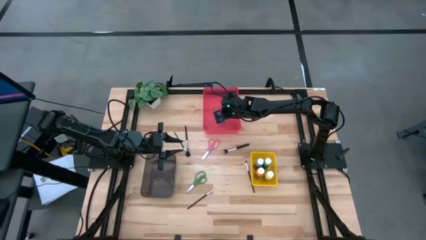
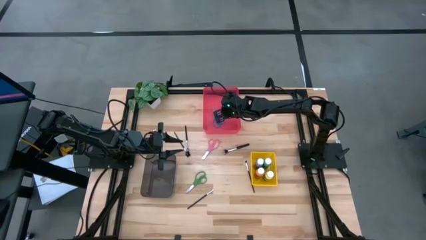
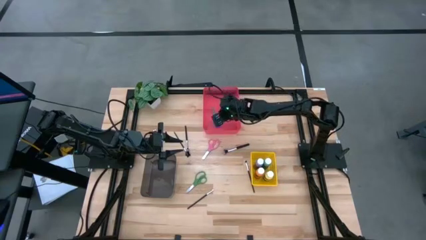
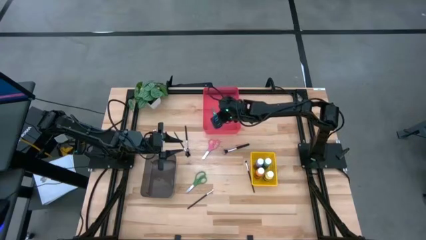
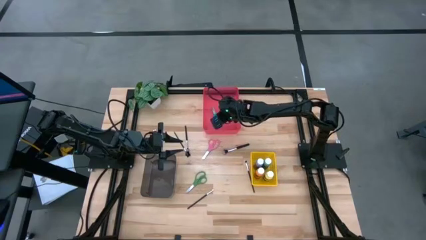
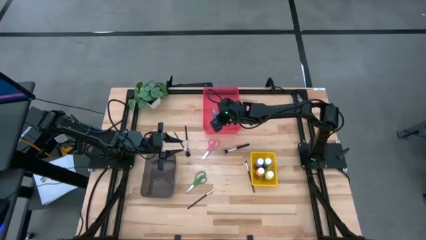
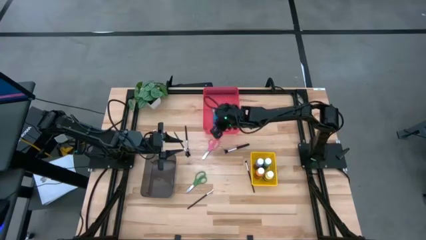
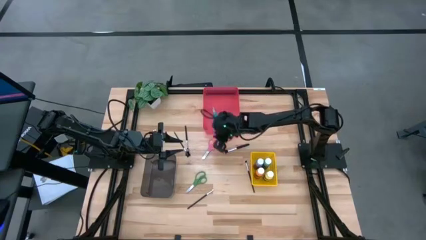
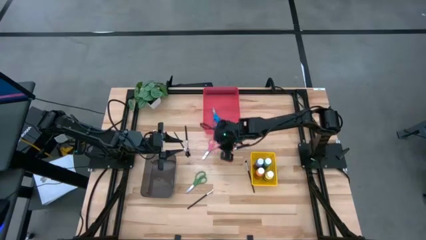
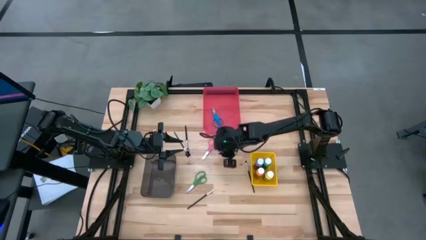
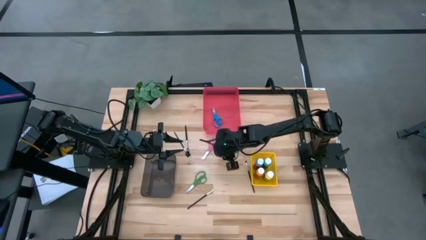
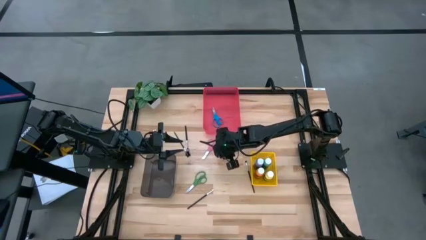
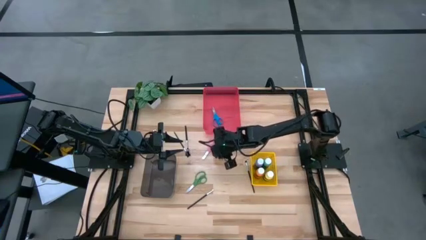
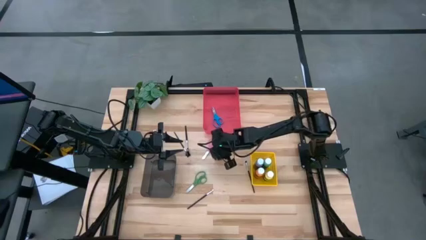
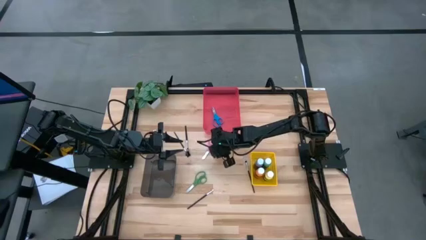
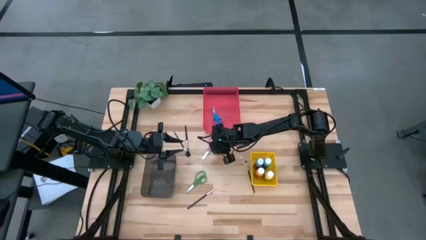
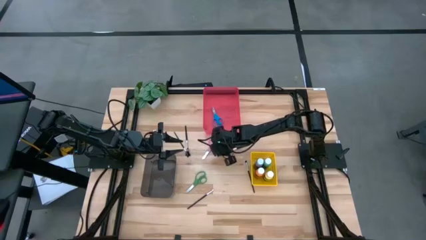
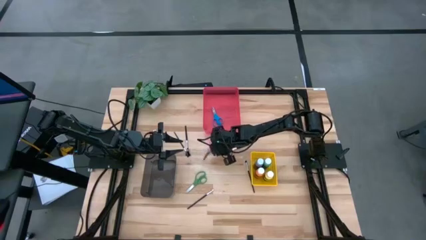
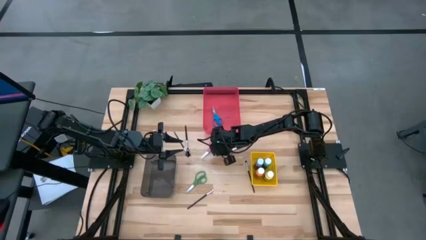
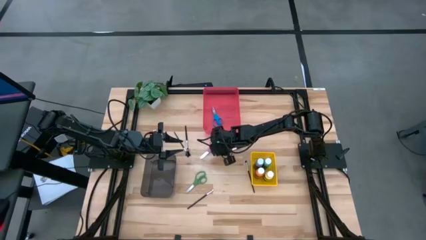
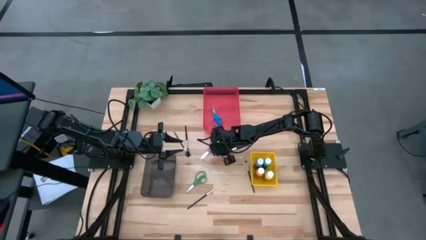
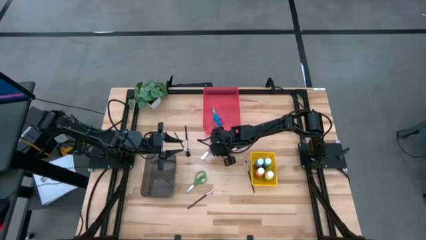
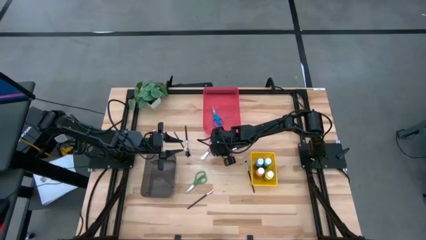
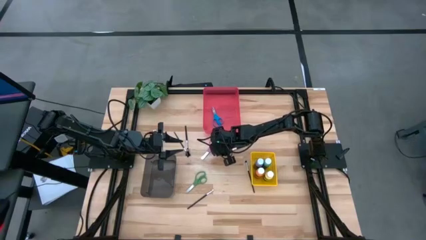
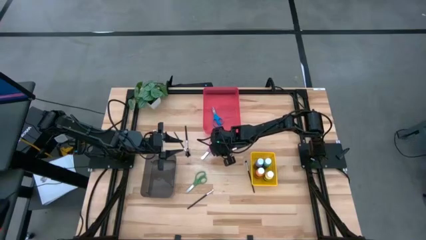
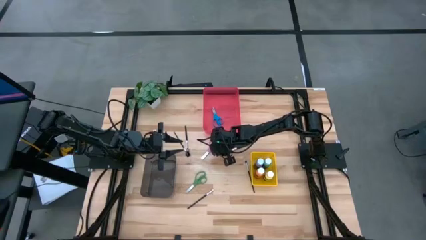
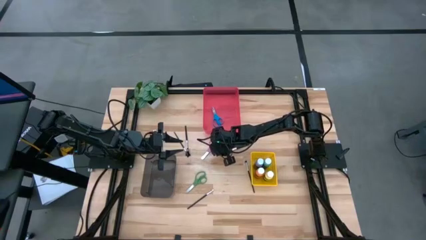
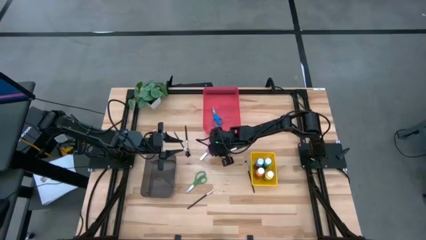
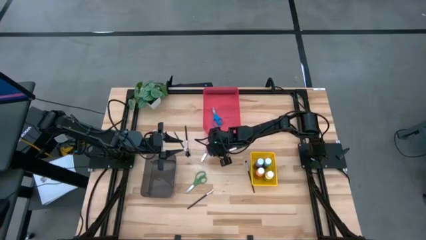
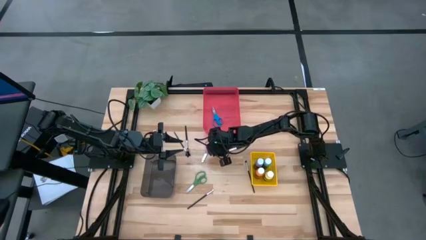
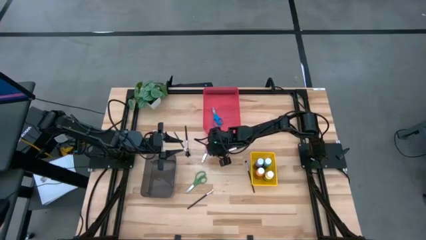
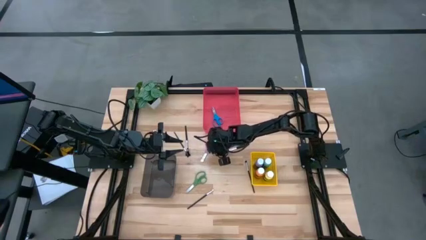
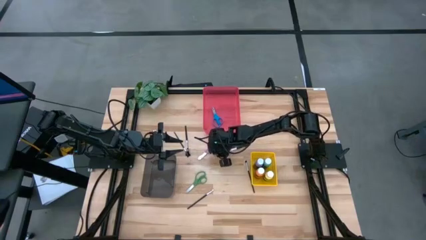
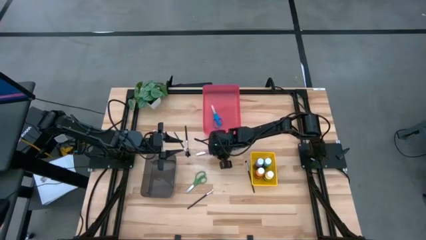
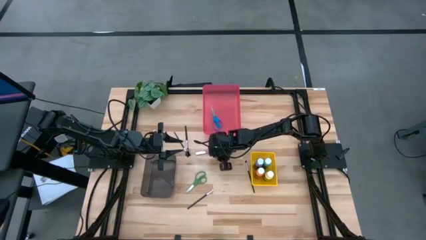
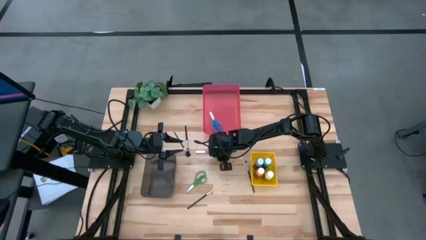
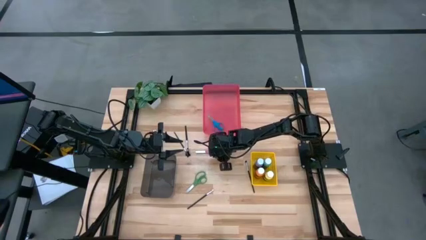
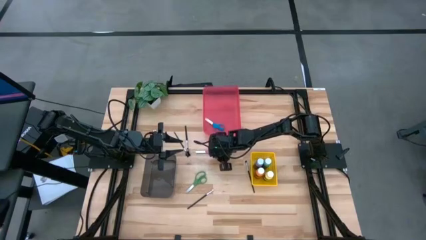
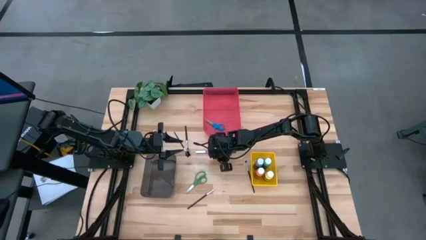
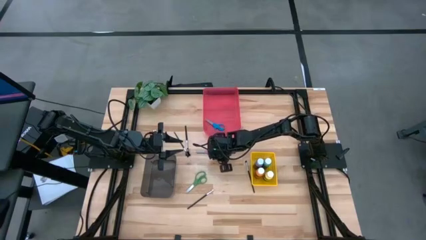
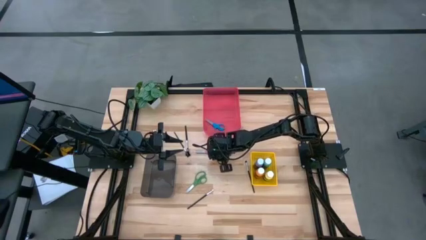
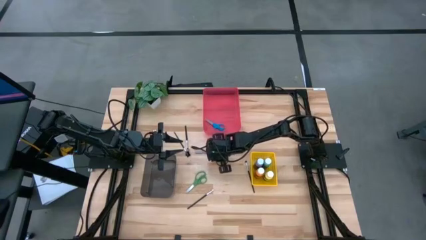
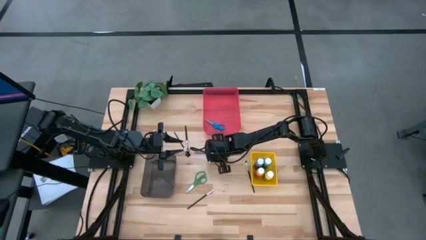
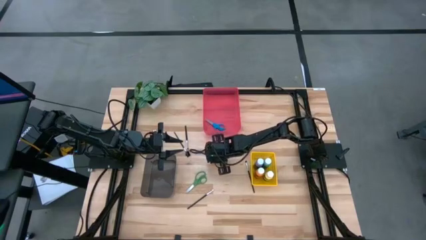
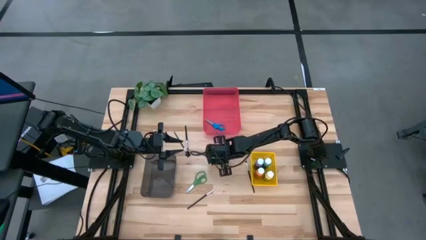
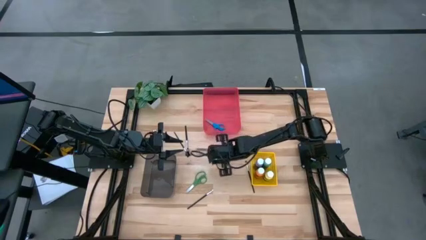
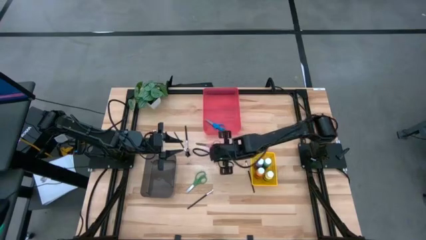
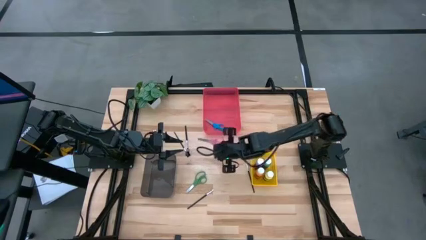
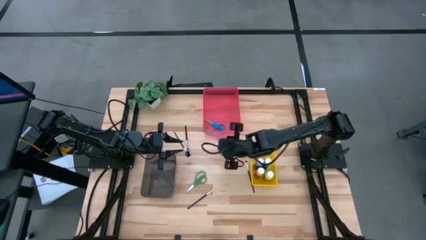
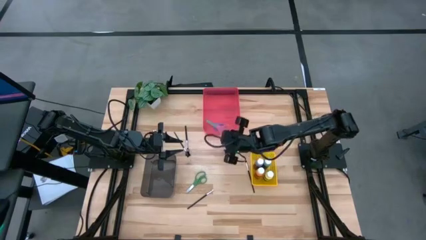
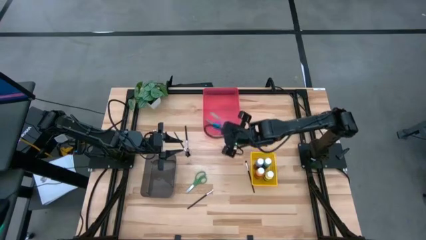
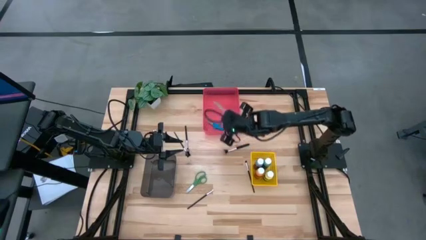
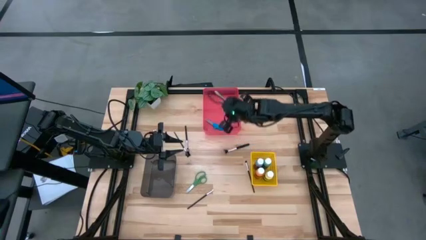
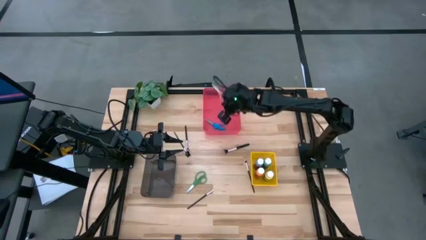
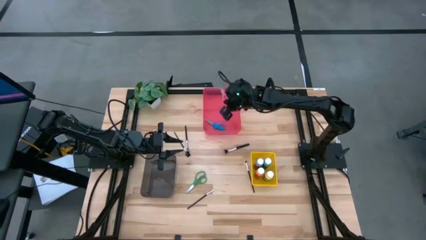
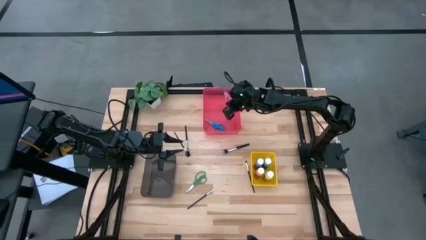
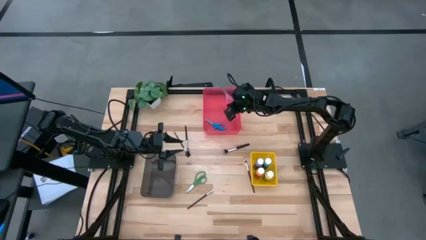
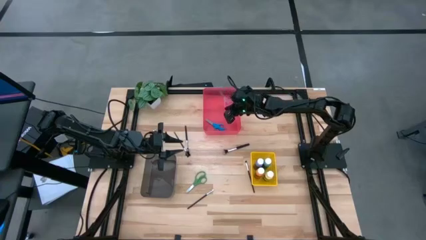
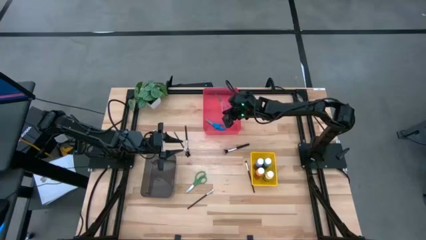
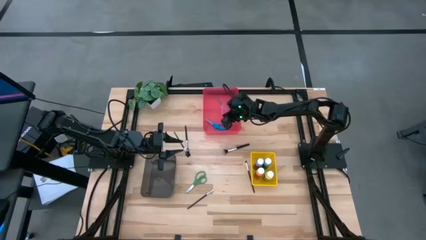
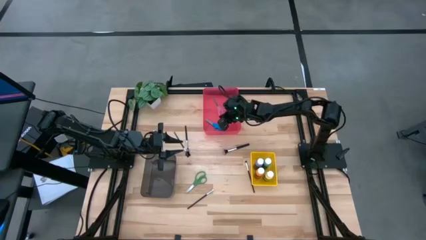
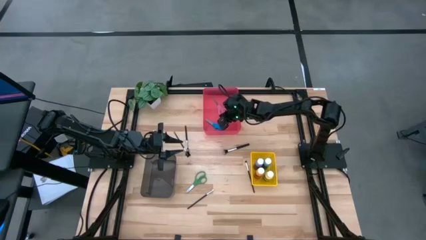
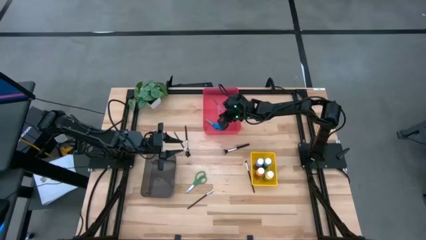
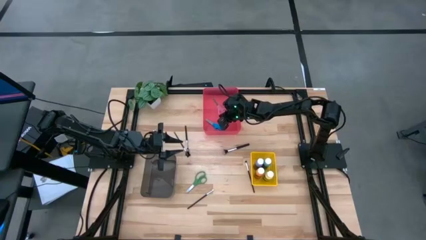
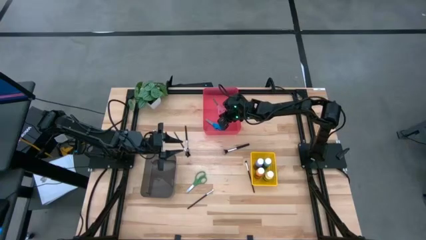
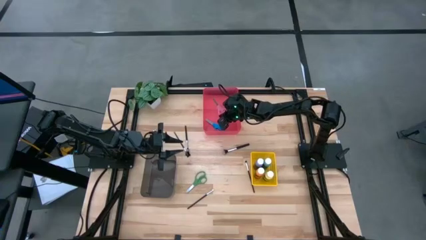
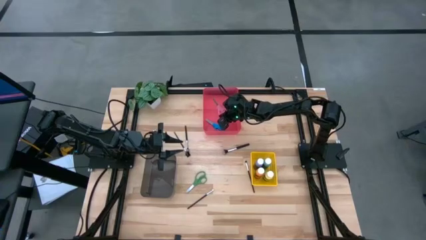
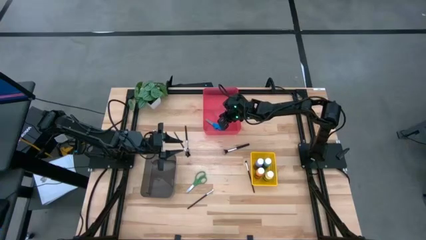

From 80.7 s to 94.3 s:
Task: Pick & Place Paint Supplies
Put the pink scissors into the pink bin
